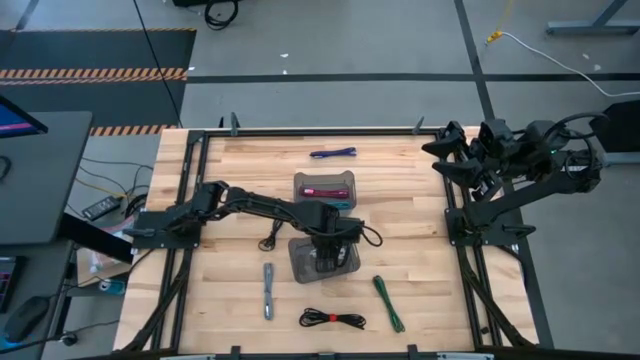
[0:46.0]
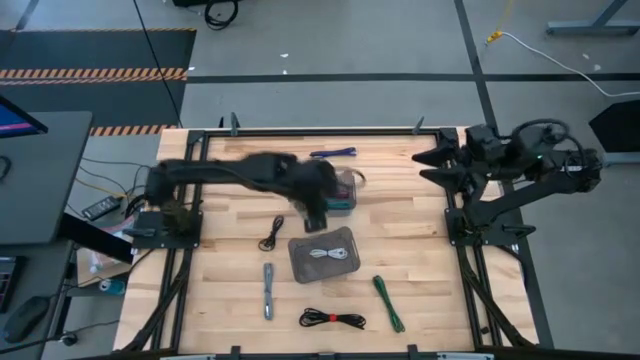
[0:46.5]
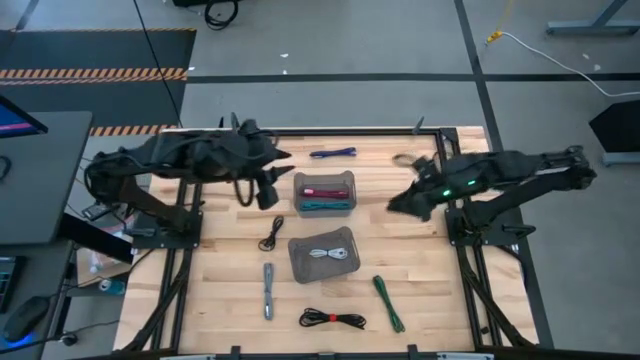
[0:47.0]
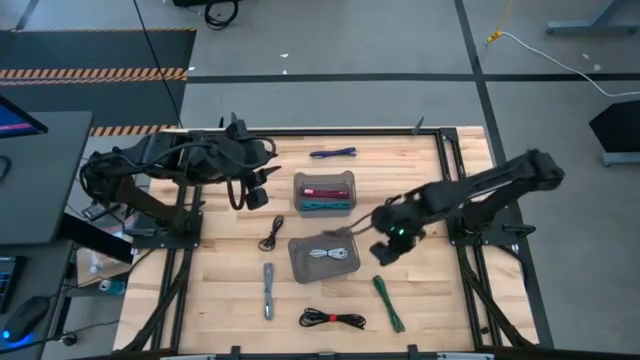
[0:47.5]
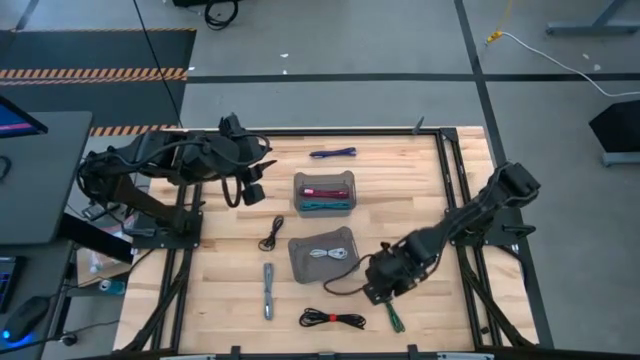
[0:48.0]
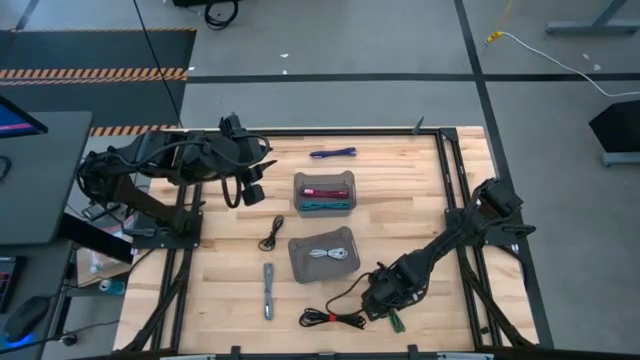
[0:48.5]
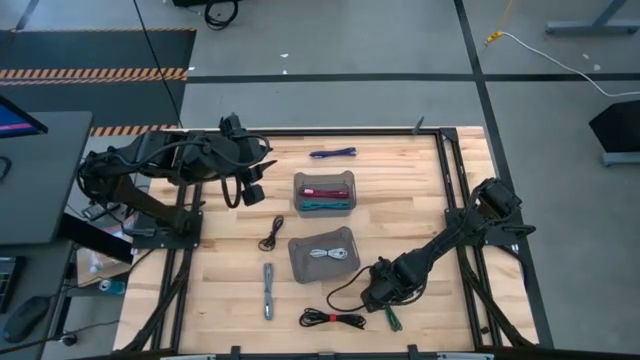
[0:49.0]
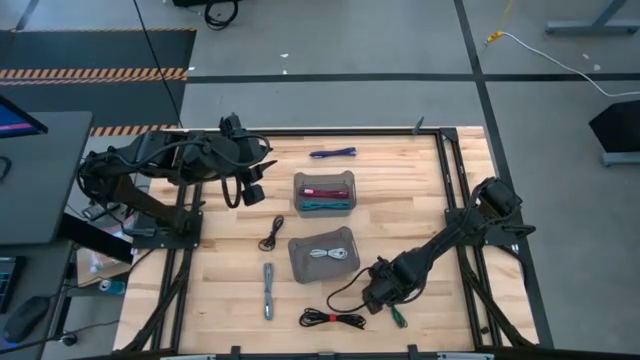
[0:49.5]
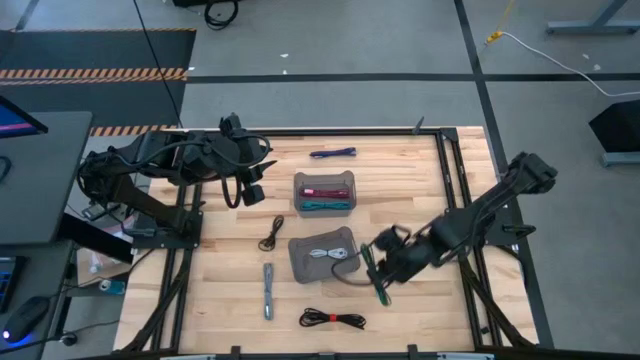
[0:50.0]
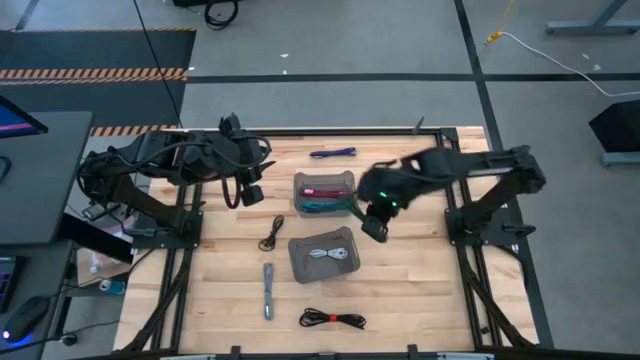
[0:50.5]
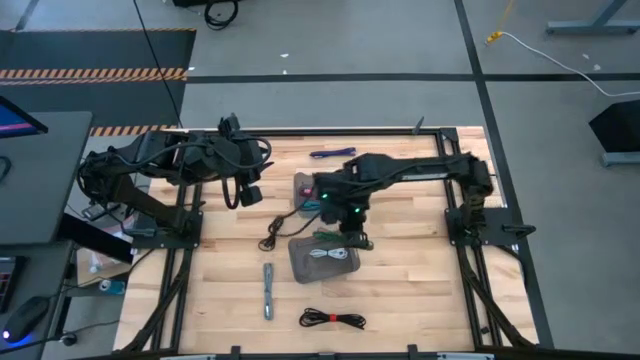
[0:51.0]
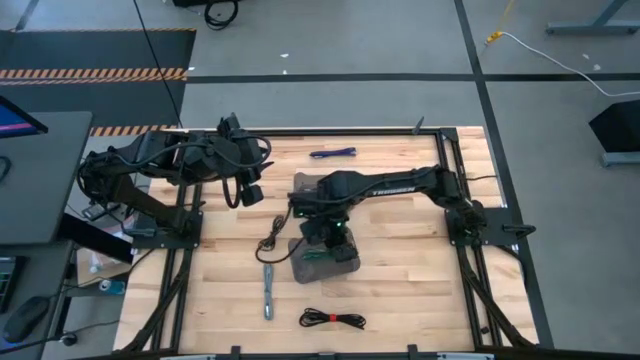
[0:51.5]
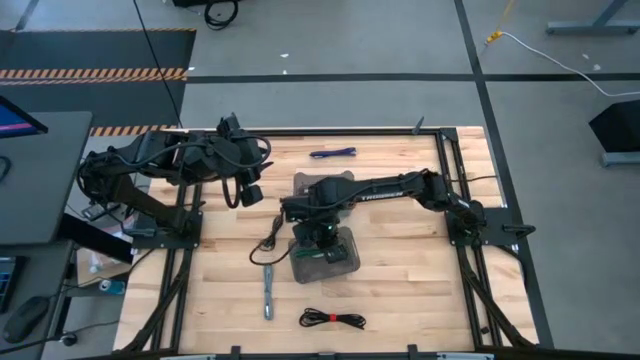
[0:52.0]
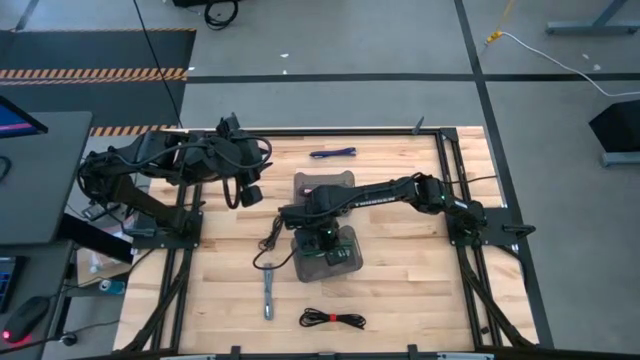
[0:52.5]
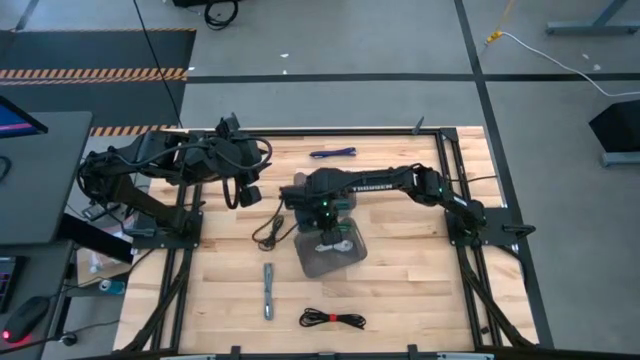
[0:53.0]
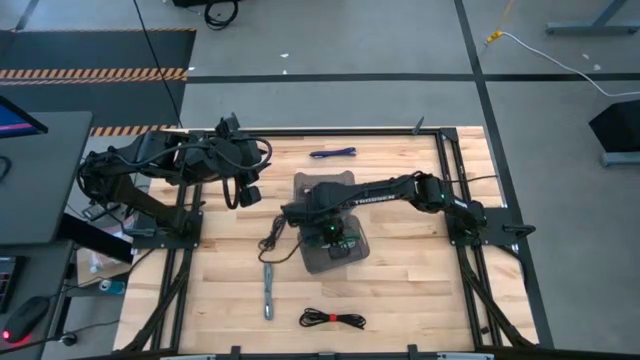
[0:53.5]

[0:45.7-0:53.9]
Task: Pick and place USB-C Cables
Put the green charger cable into the bottom black transparent bin

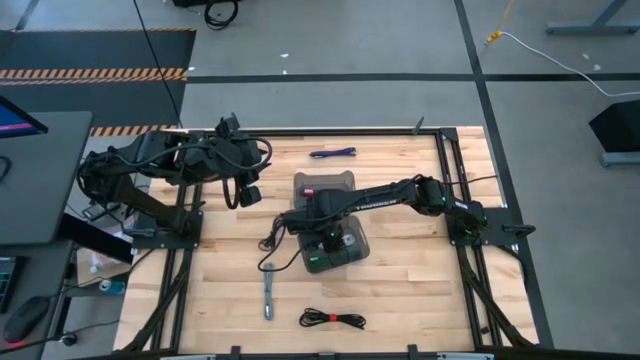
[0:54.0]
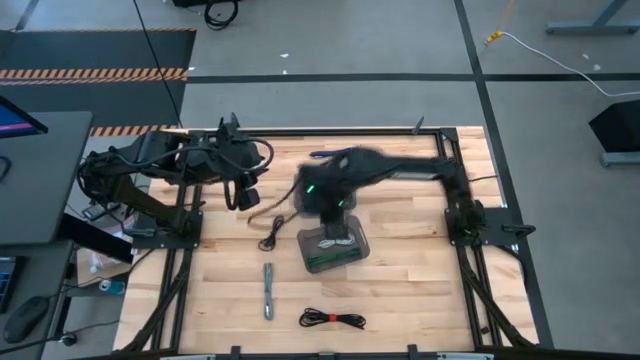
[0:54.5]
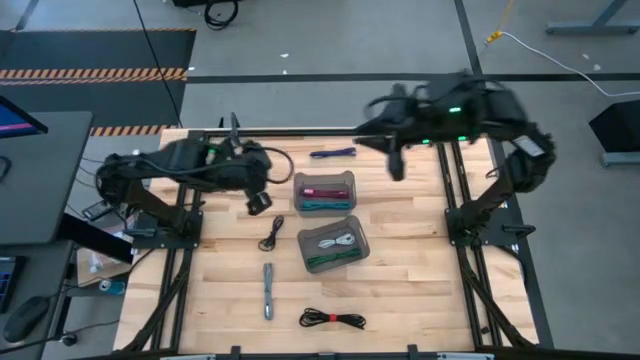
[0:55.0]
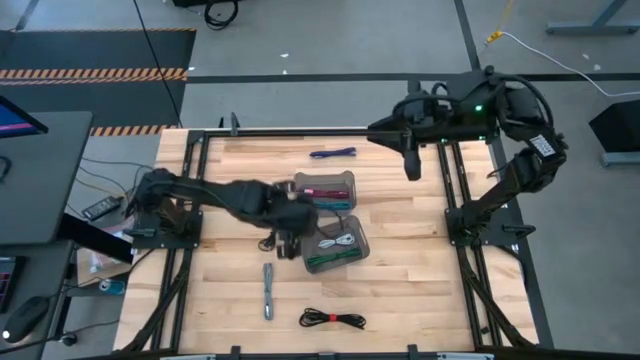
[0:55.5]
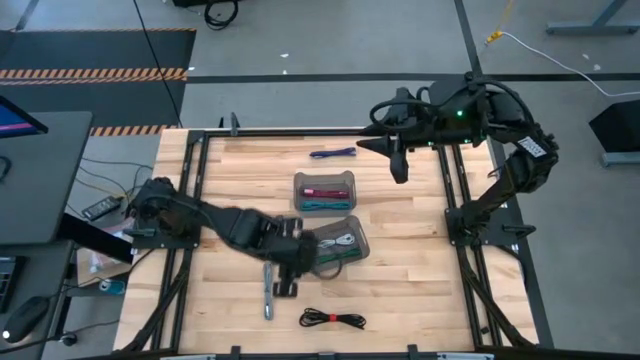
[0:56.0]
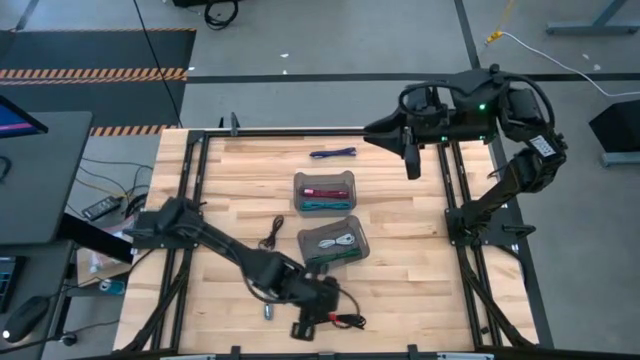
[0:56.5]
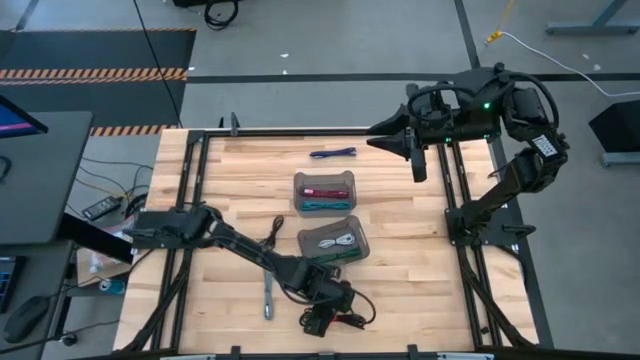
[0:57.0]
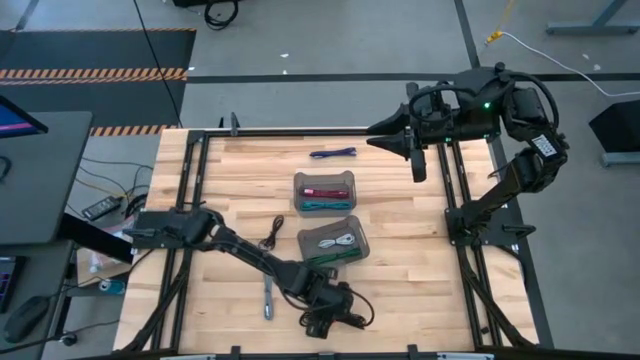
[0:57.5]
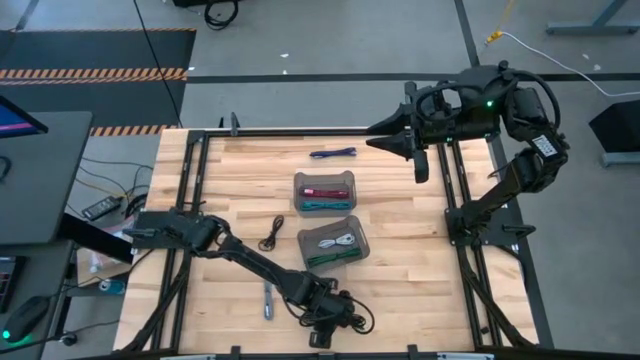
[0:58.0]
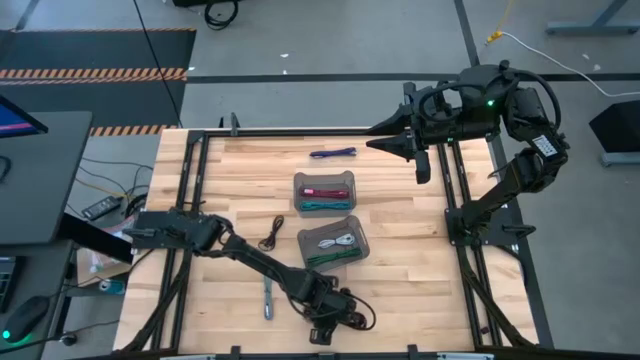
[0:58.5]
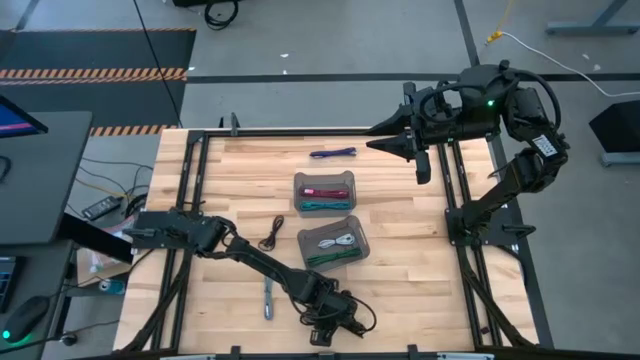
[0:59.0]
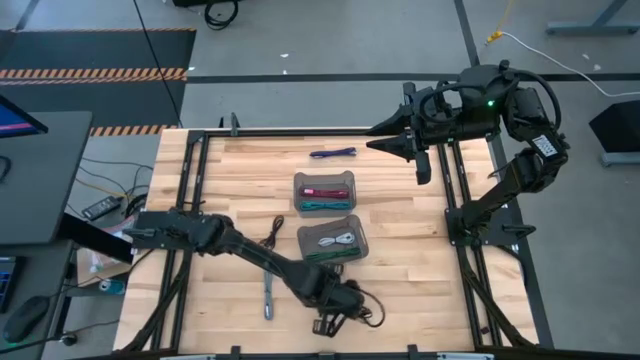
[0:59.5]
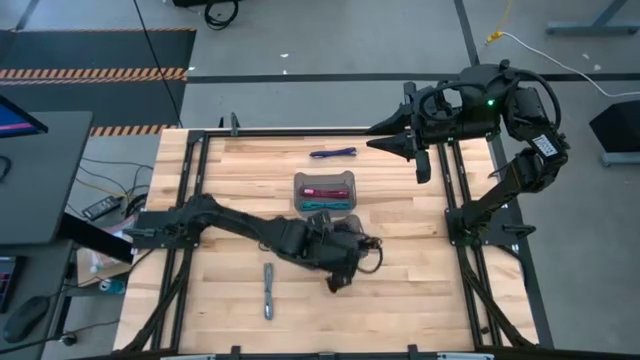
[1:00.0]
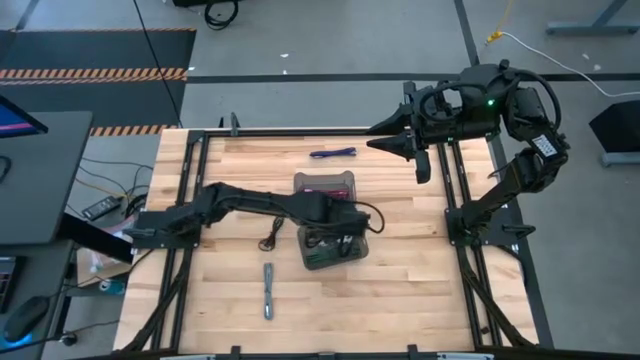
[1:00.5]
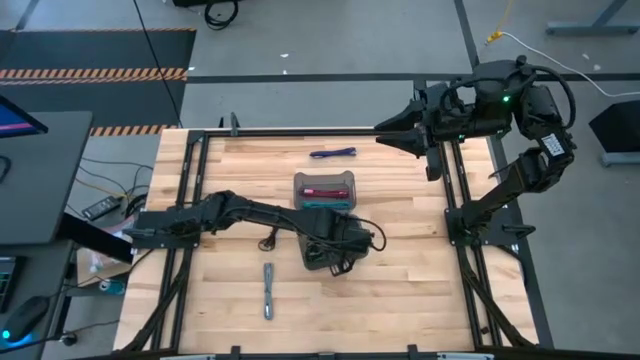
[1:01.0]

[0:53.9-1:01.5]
Put the bottom black charger cable into the bottom black transparent bin

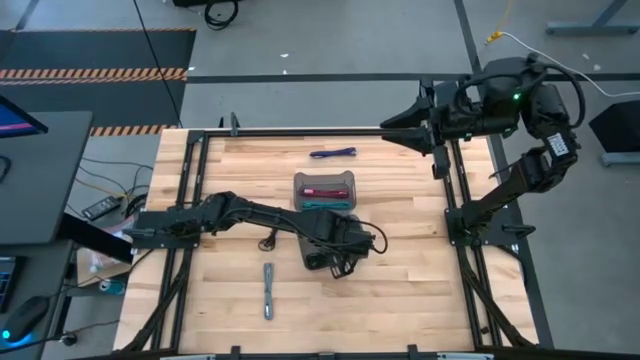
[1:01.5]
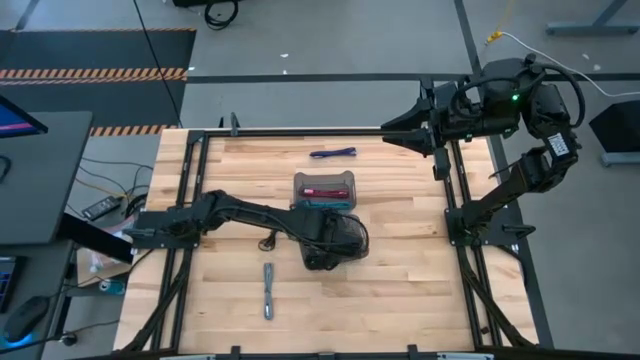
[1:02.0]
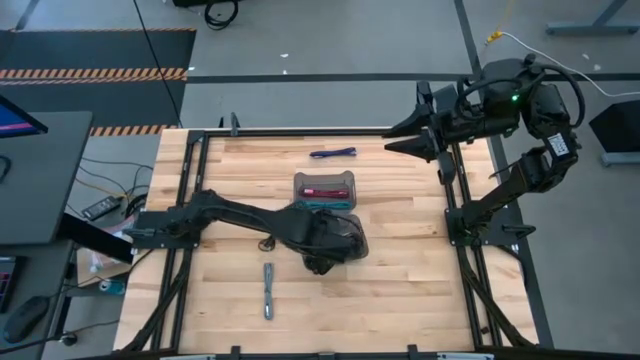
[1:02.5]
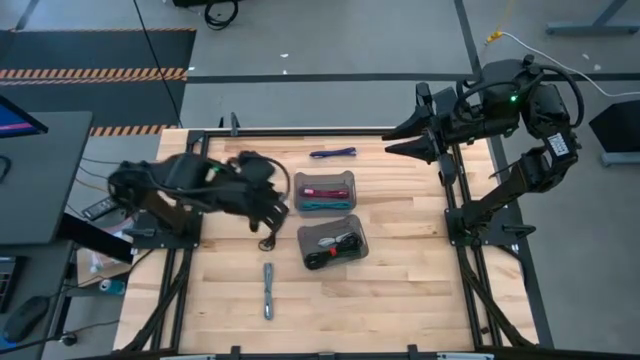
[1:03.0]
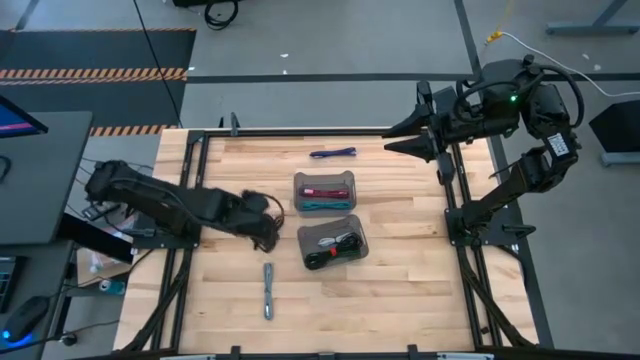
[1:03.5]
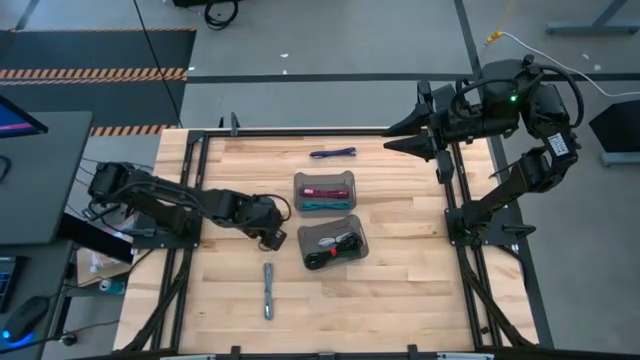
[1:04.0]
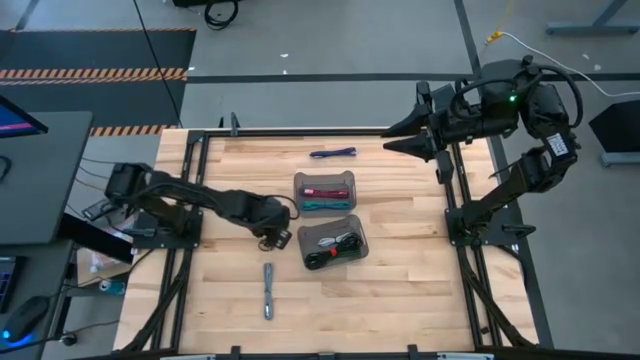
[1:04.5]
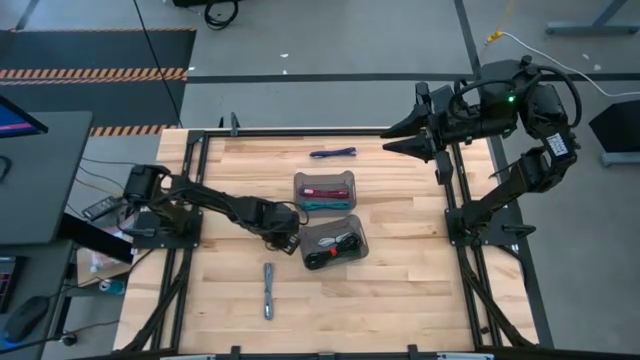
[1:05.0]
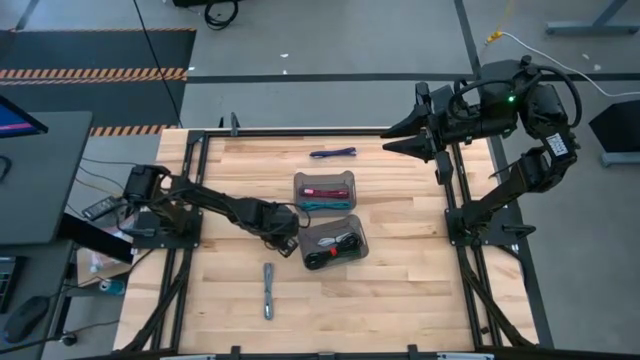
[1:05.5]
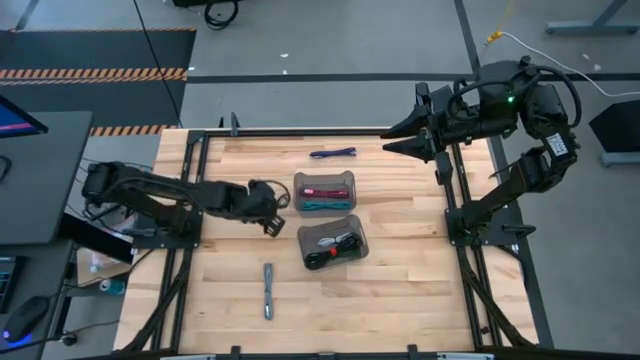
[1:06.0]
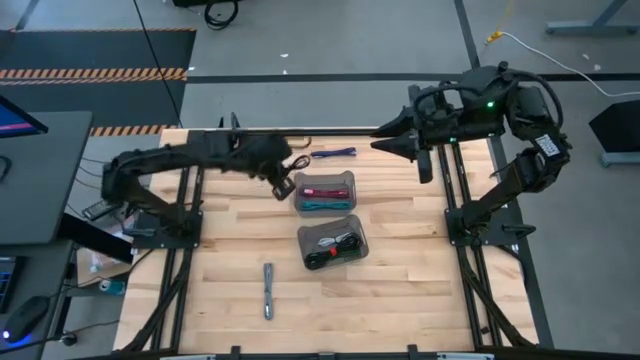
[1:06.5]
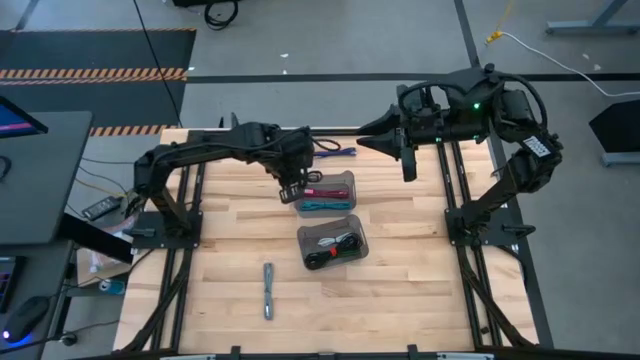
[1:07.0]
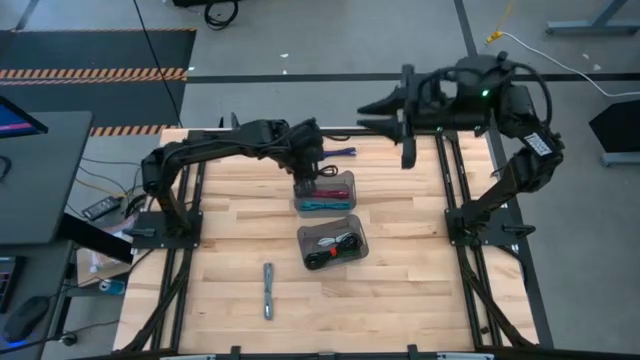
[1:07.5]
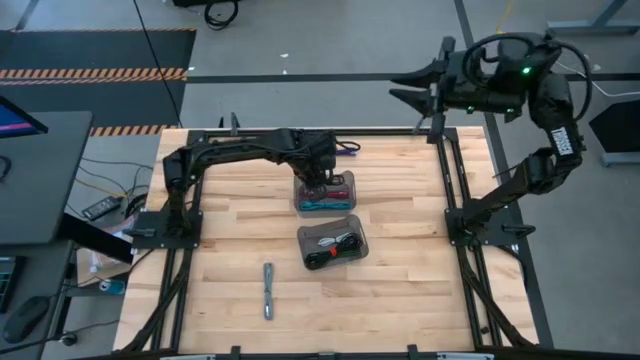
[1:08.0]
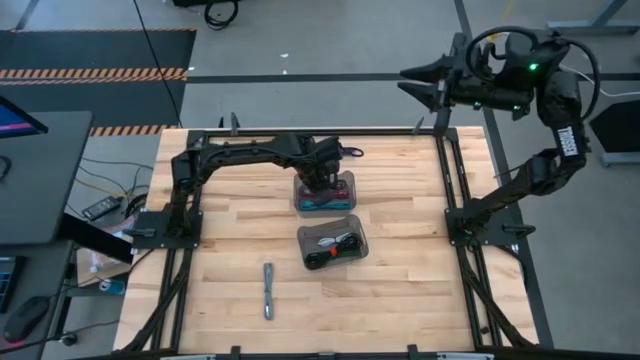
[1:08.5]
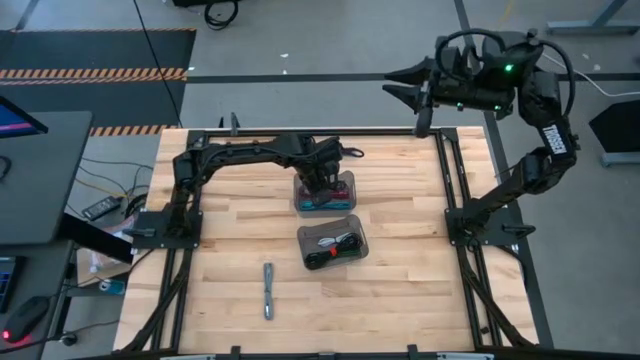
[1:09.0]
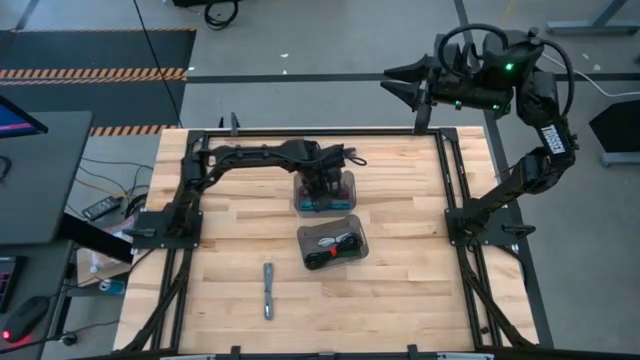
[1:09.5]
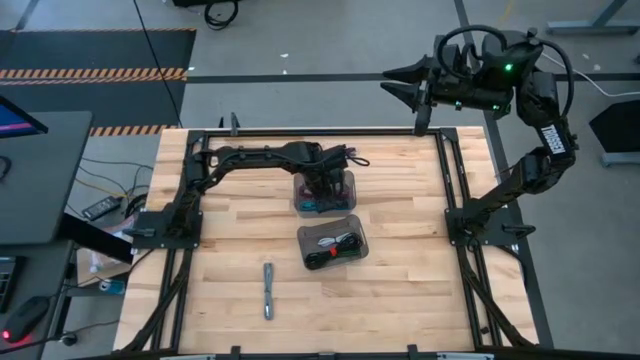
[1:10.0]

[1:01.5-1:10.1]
Put the black charger cable into the top black transparent bin
